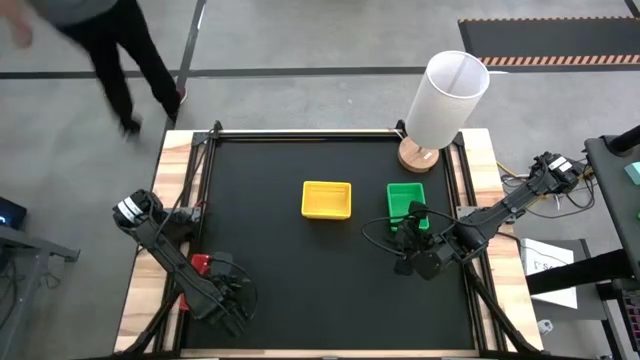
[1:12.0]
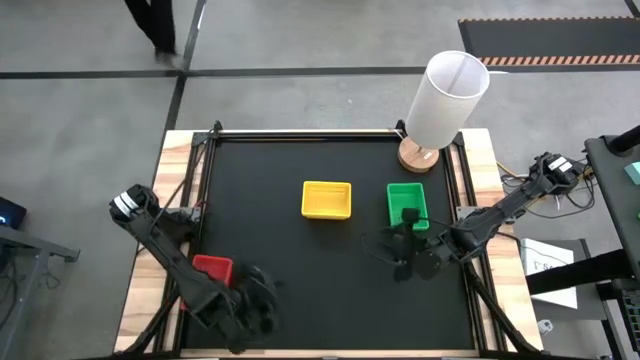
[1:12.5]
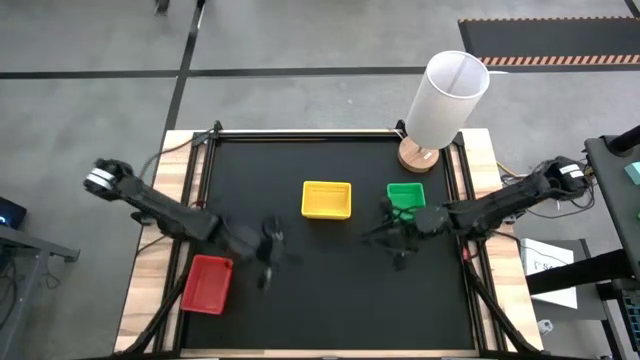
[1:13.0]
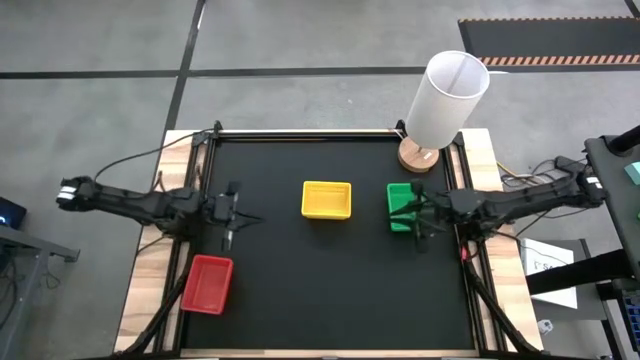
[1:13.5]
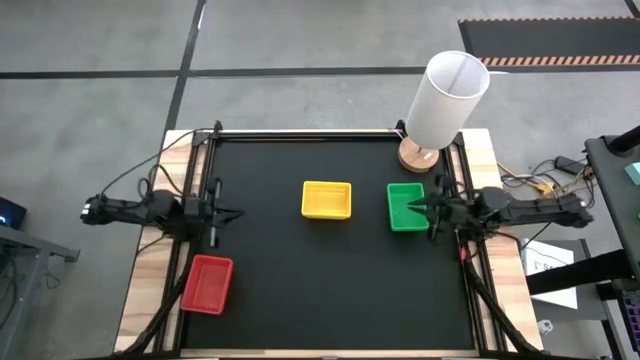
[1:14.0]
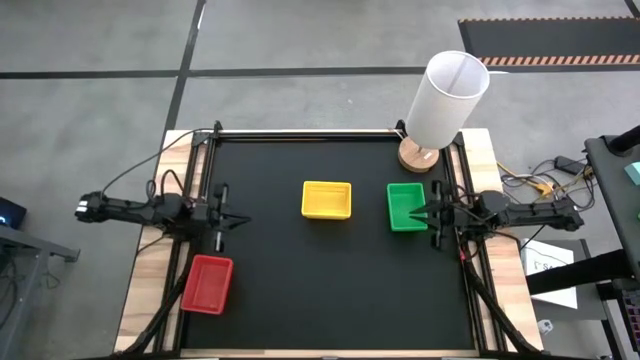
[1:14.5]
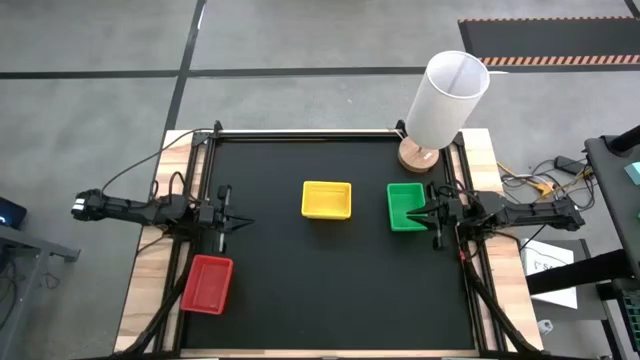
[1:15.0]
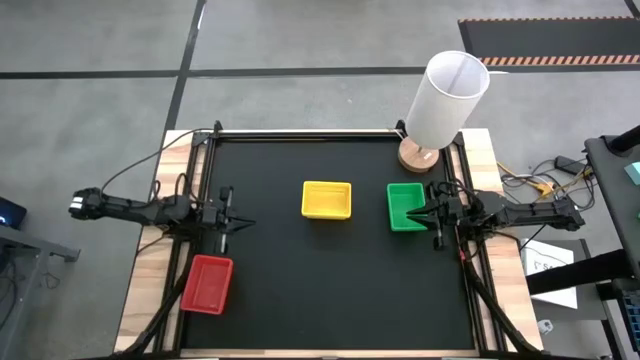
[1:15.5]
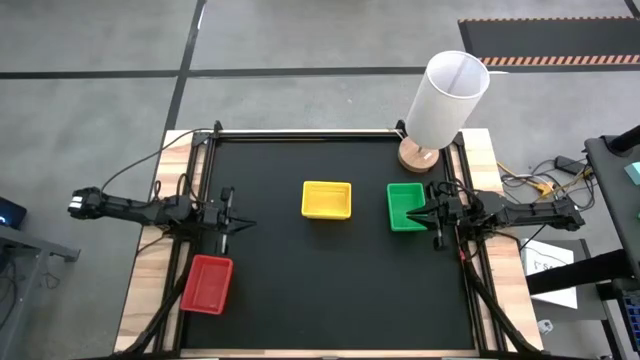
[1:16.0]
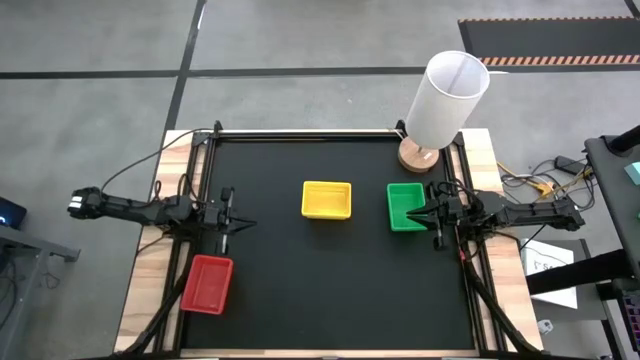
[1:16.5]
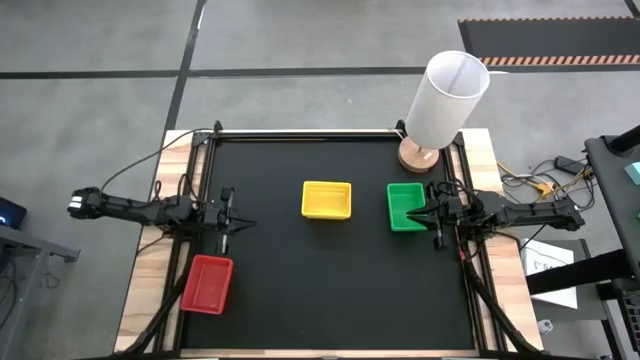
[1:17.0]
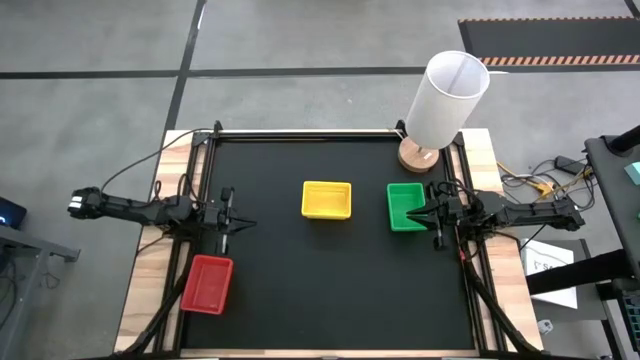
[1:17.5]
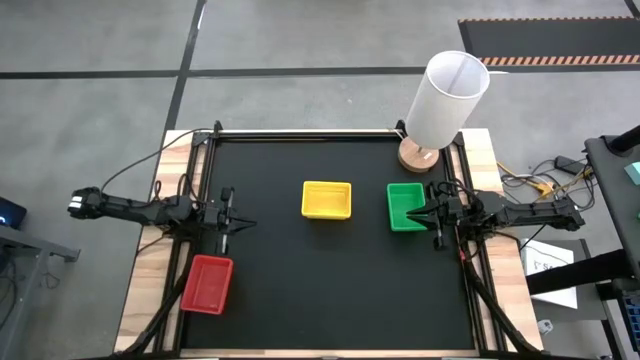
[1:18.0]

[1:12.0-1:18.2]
Return to Home Position
